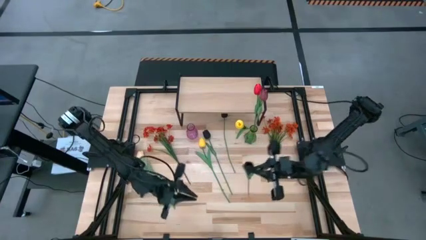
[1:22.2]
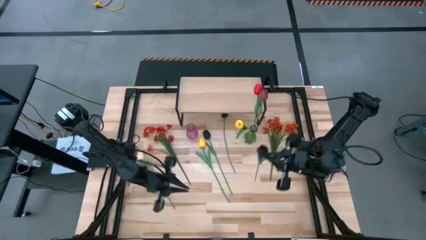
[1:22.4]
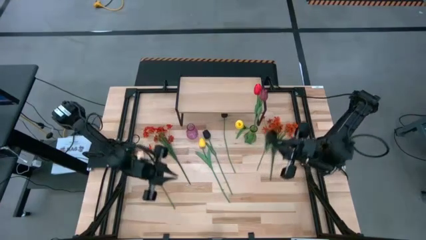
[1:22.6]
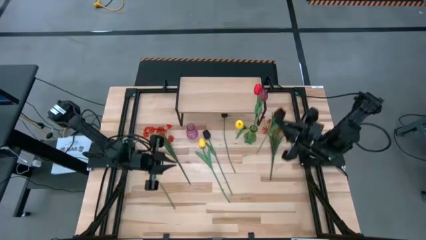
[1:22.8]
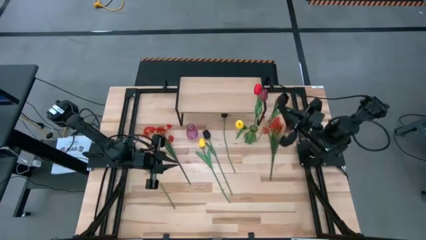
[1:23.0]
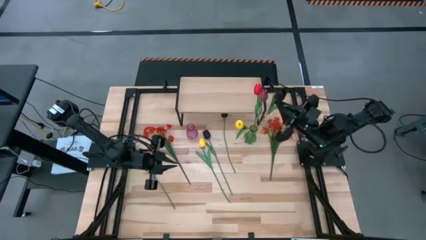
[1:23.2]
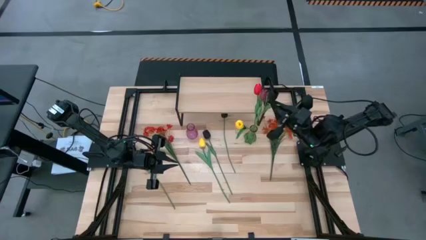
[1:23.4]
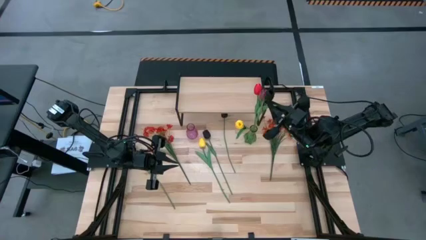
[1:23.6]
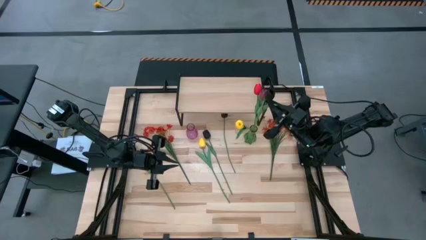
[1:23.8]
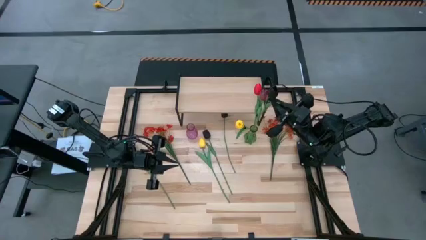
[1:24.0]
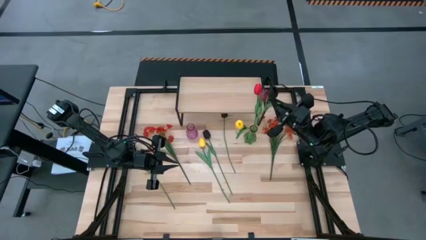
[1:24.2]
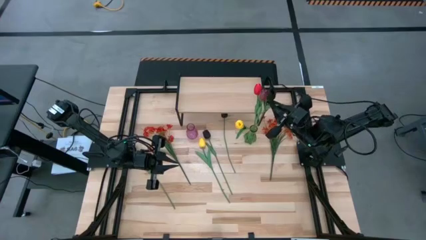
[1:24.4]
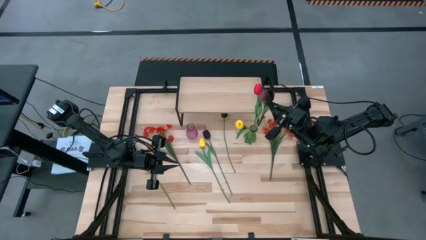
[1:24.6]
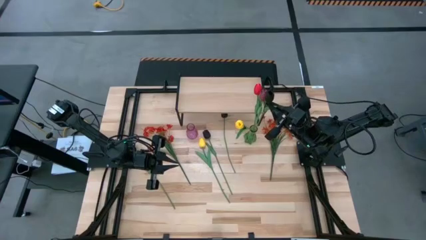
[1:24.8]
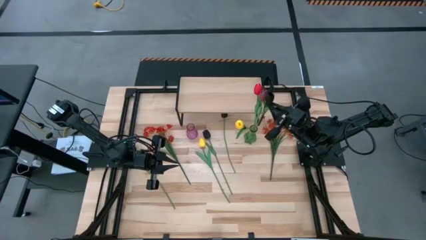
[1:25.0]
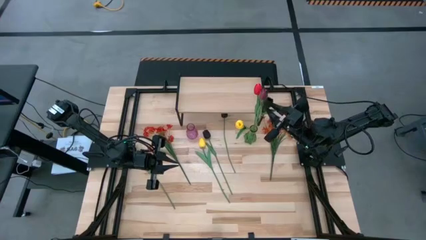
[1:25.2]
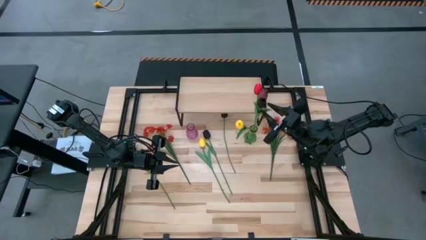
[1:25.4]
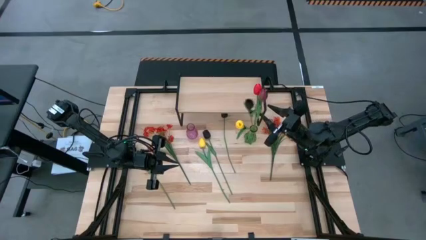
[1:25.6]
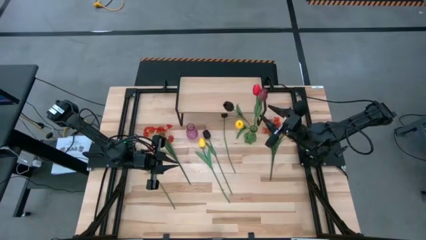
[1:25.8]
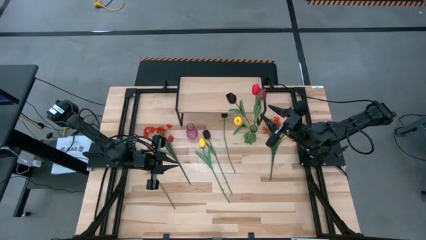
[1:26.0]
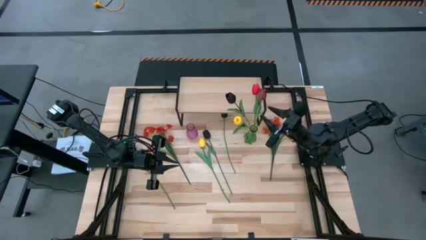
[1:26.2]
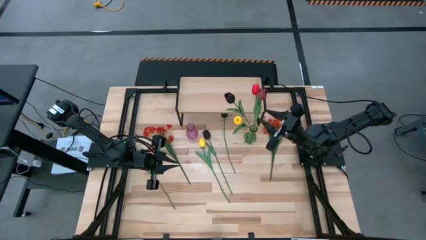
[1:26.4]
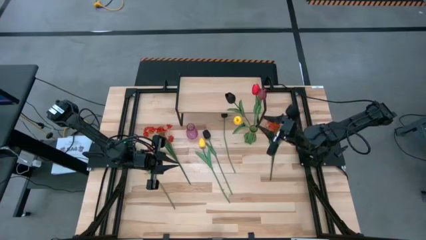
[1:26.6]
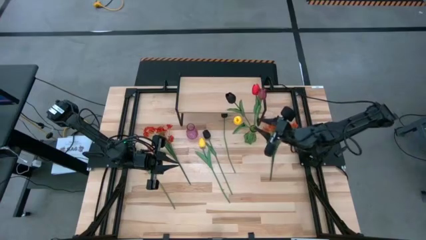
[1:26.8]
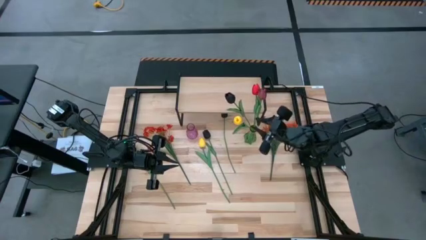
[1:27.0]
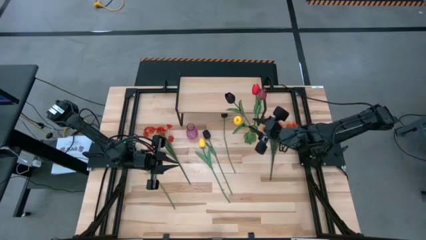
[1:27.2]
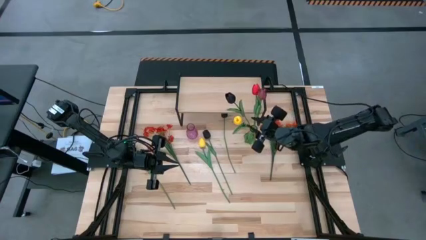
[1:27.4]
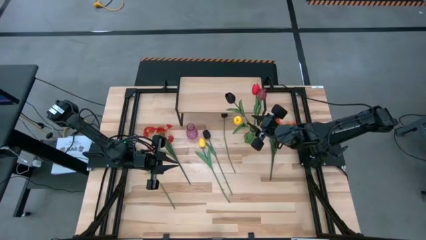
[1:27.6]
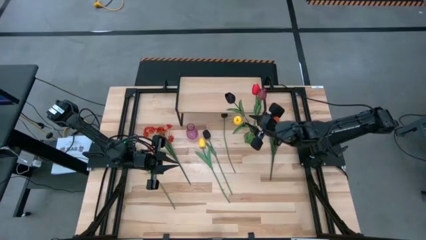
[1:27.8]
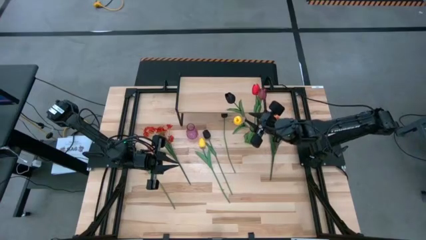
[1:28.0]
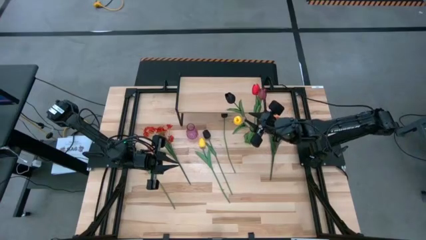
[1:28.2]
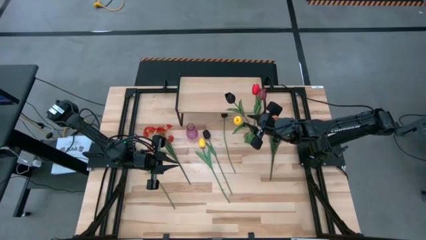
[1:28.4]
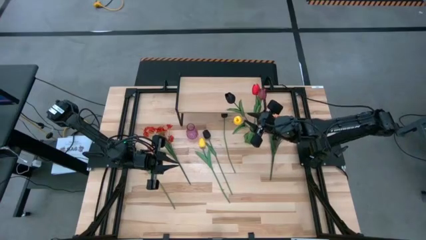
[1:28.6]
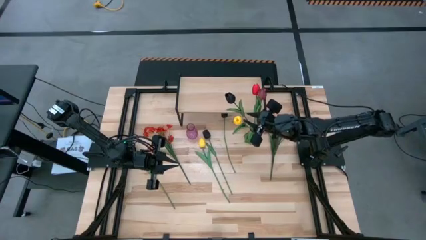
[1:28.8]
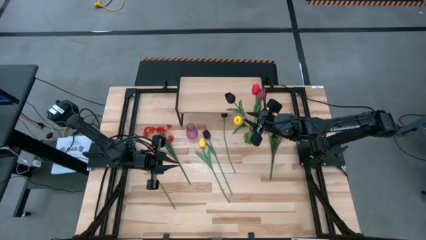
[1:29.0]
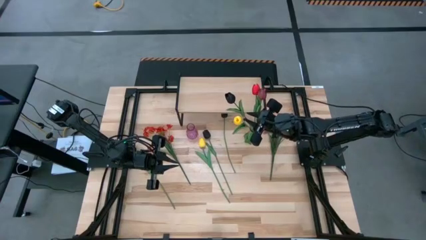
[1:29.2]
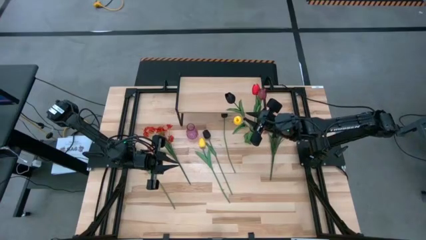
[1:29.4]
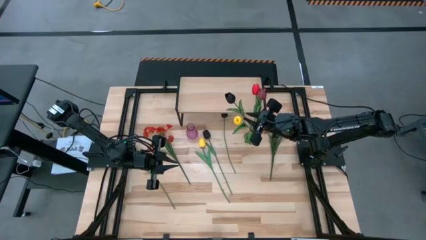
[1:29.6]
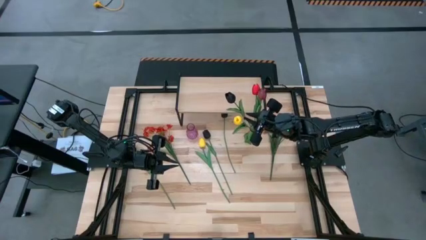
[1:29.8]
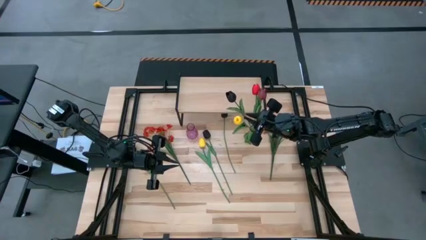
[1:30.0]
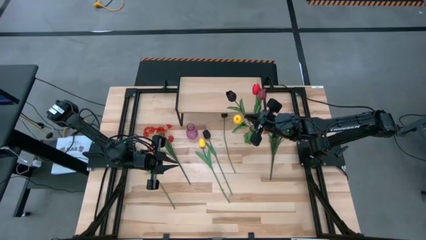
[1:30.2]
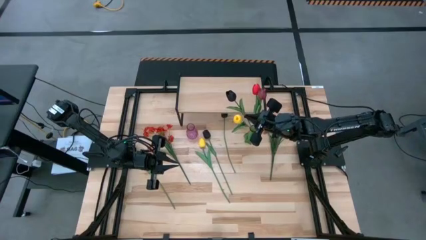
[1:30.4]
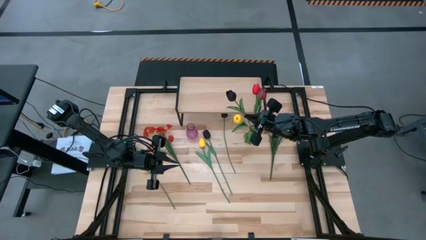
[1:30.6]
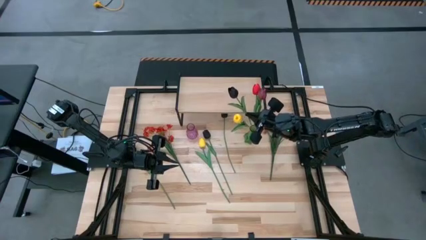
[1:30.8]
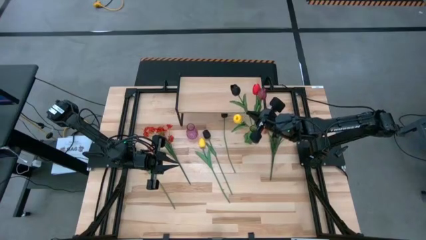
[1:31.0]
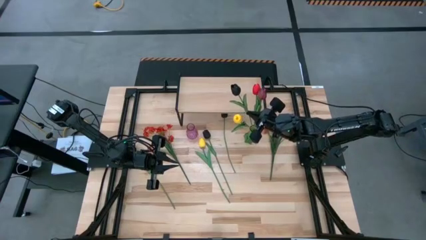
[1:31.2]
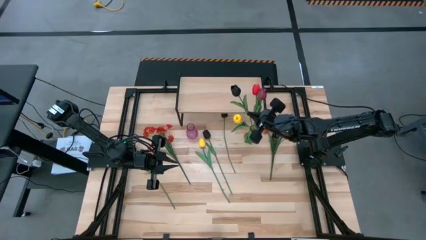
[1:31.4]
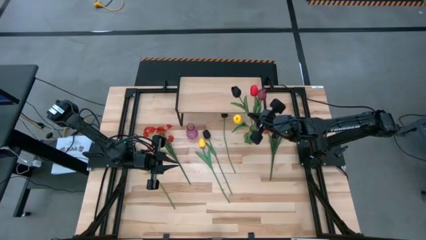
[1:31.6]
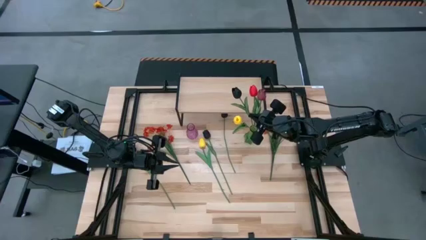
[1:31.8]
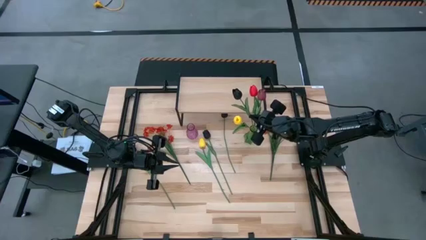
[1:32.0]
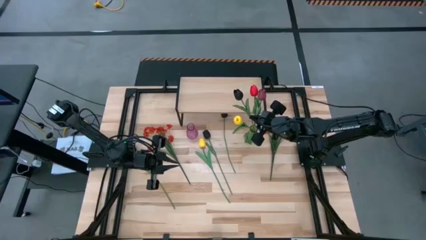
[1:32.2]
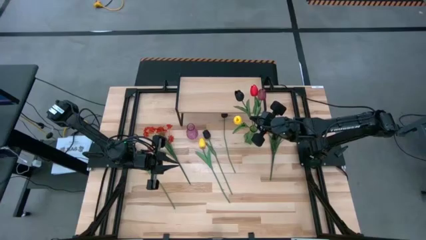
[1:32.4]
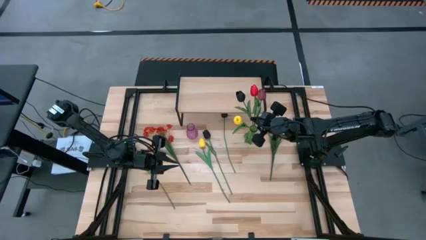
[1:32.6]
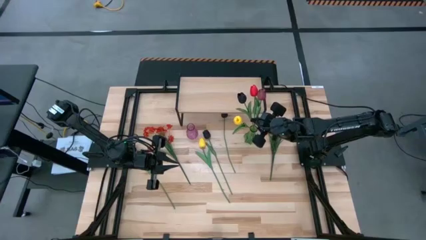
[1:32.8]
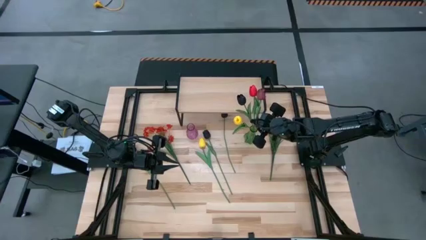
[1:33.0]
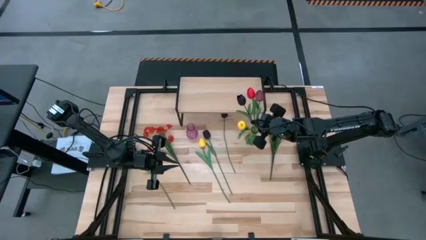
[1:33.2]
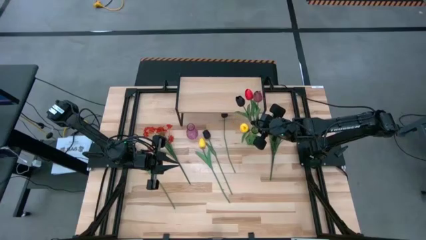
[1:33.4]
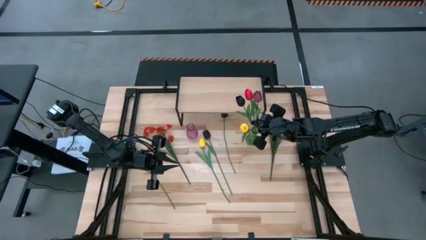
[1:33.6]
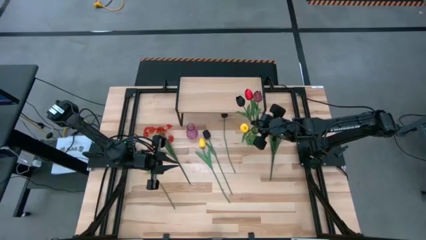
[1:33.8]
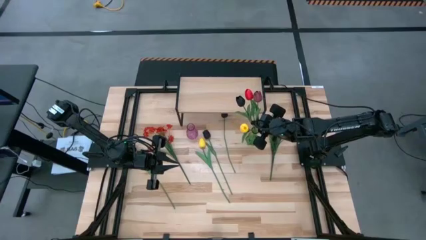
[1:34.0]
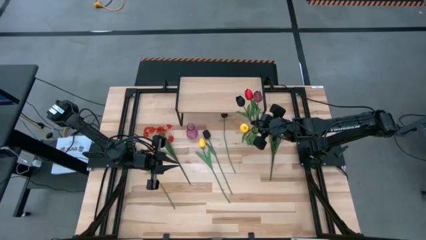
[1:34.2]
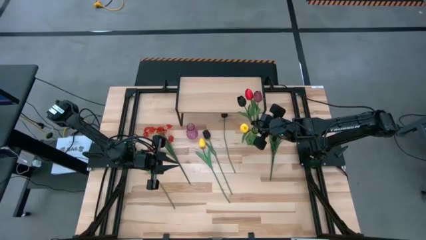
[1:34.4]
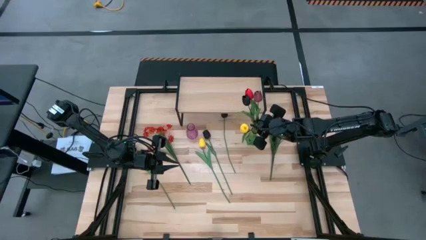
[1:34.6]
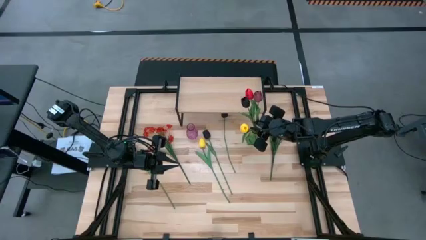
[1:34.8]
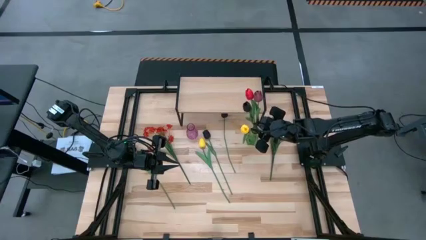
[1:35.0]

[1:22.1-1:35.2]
Task: Pick and place flowers into a vace then onto a shelf
Put the bottom left black tulip into the green vase
